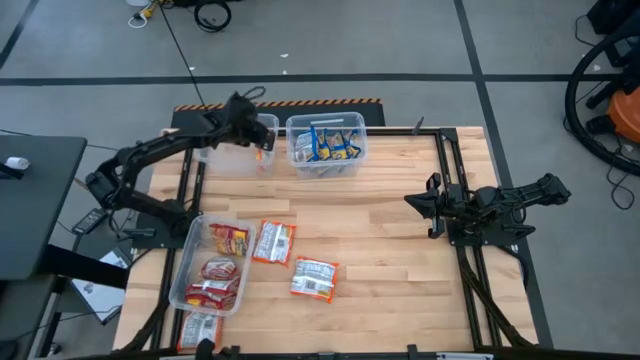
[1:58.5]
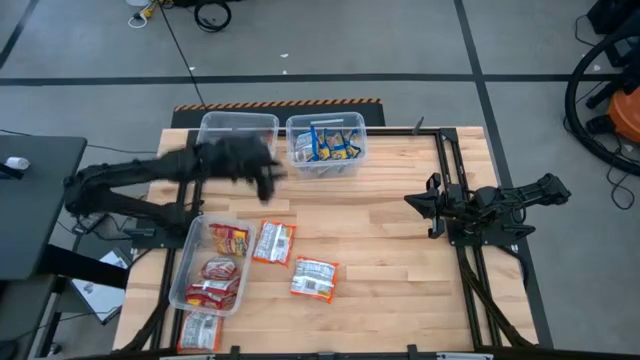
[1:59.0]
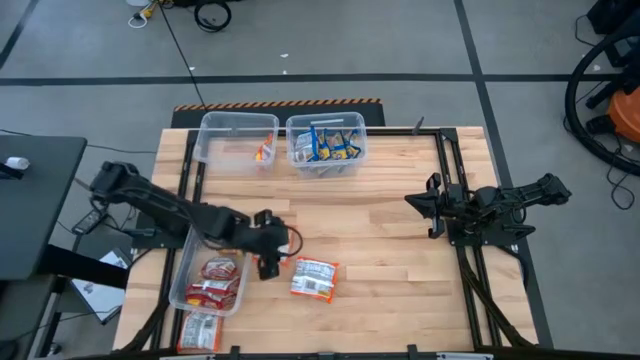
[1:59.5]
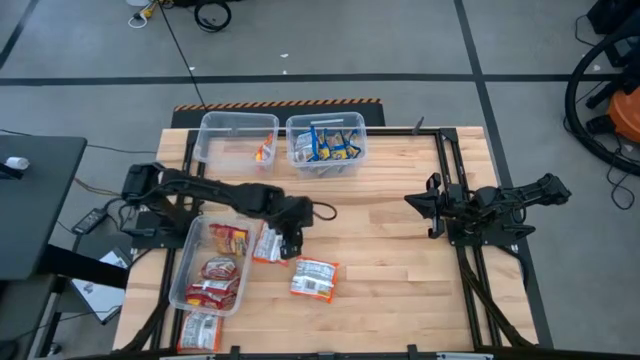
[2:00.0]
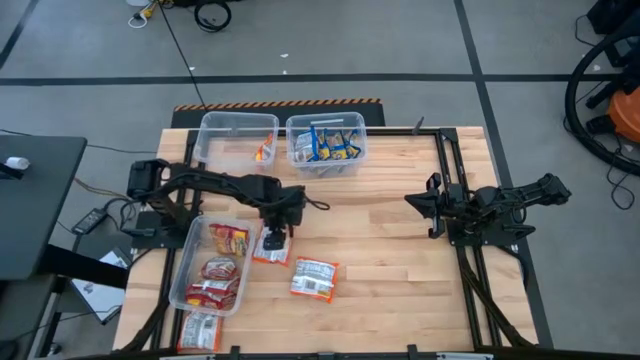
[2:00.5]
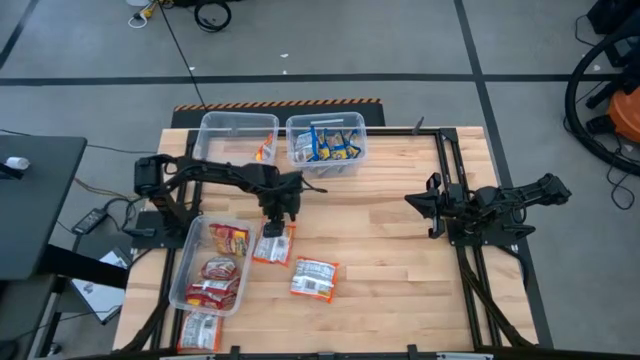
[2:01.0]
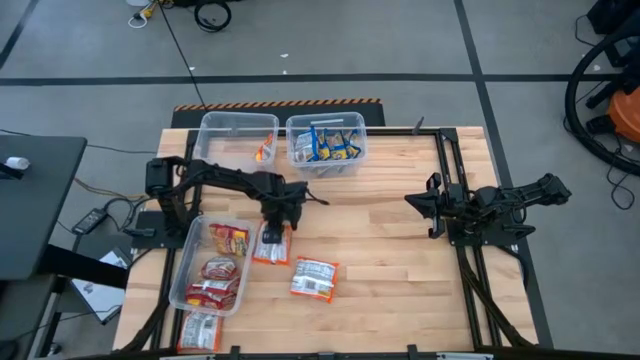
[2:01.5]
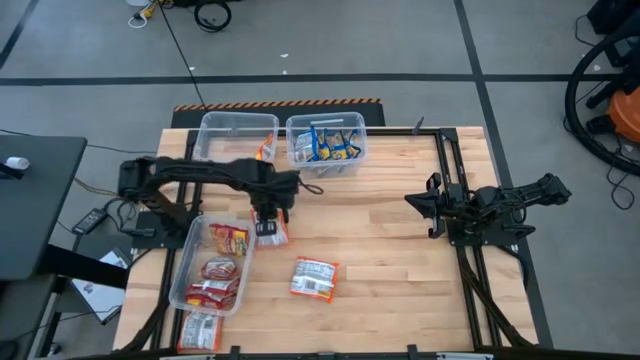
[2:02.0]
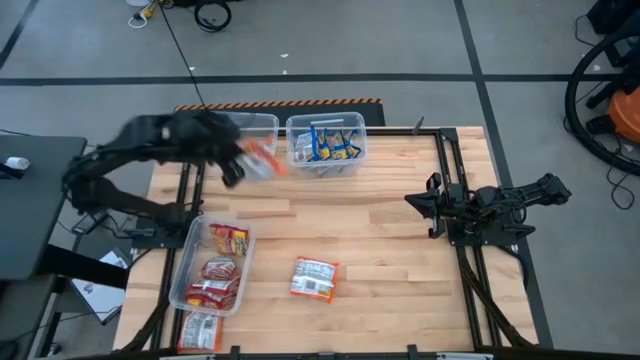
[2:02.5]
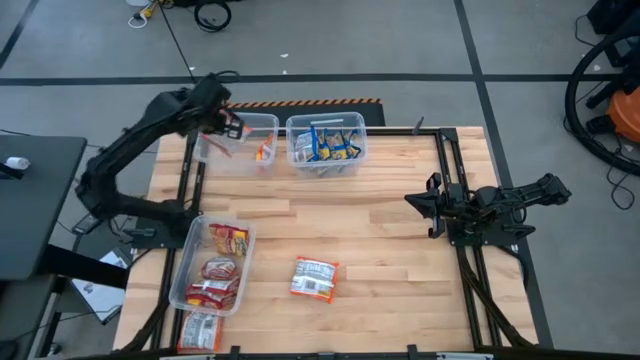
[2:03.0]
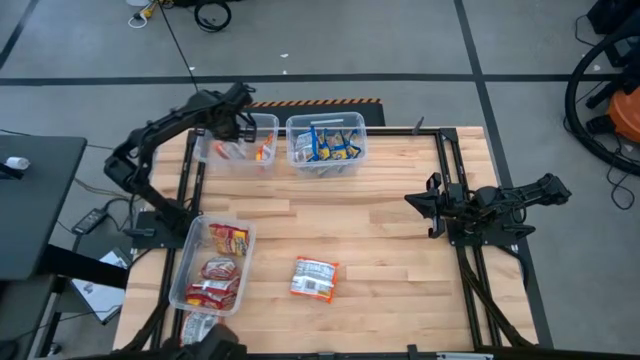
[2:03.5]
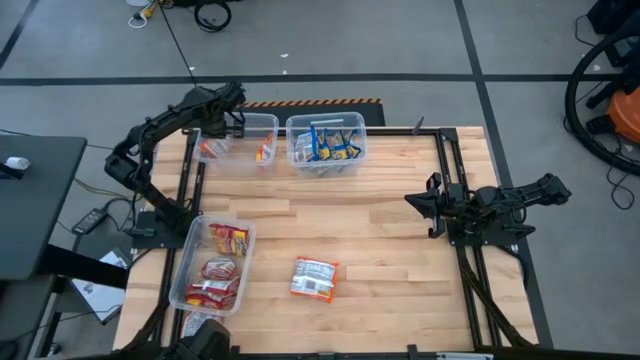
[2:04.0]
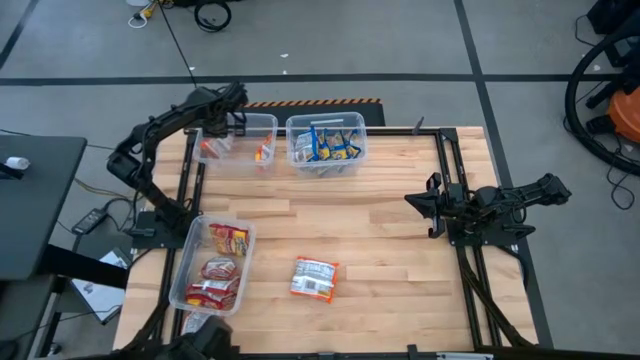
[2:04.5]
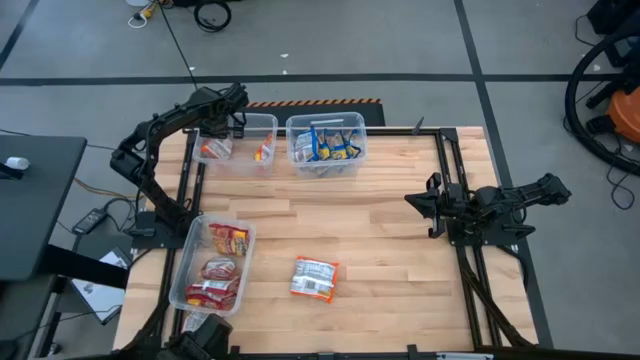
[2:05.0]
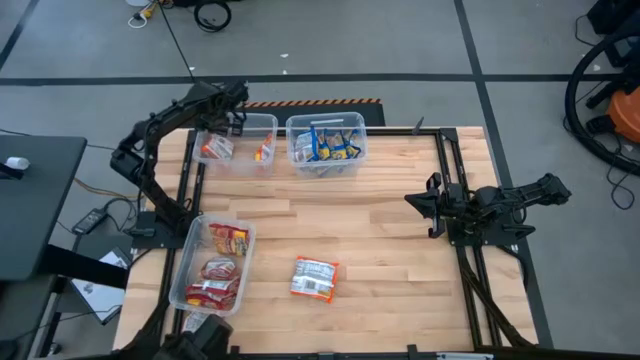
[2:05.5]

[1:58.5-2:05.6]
Task: Sort Maruchan noodles
Put the top orange noodle pack into the top left transparent bin

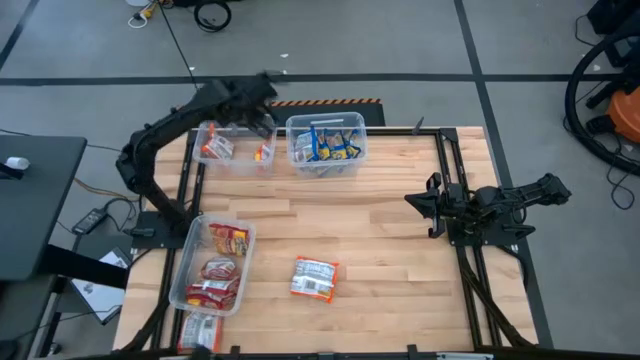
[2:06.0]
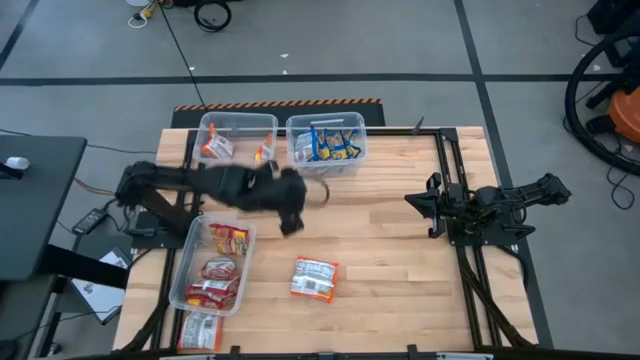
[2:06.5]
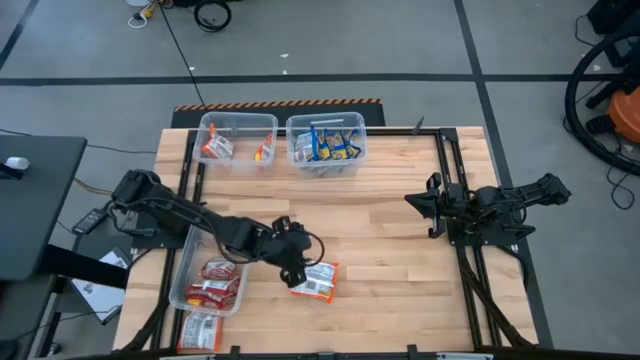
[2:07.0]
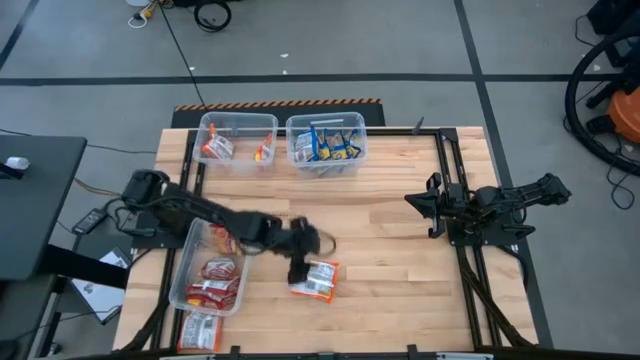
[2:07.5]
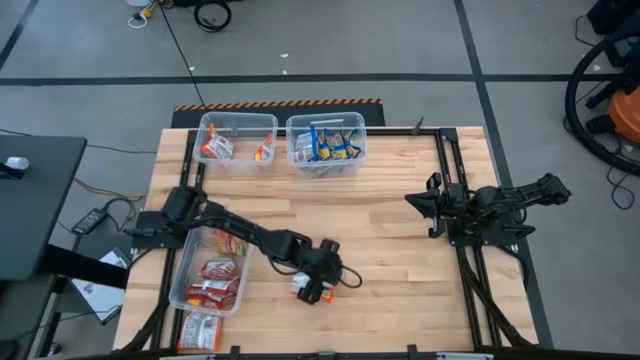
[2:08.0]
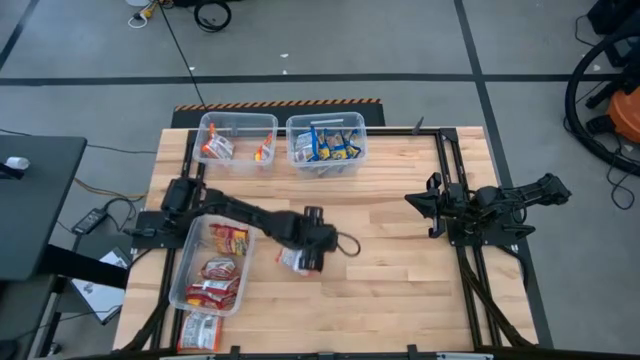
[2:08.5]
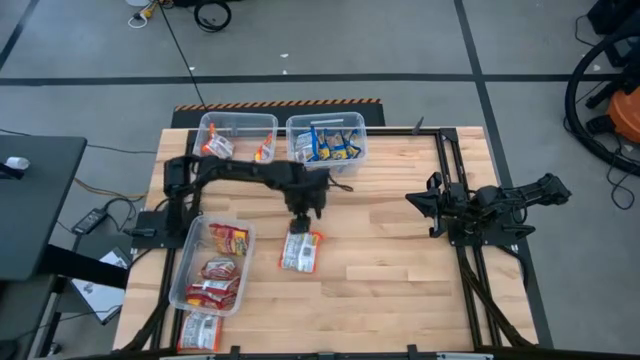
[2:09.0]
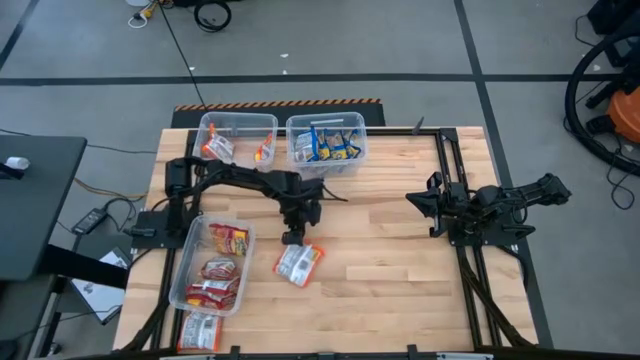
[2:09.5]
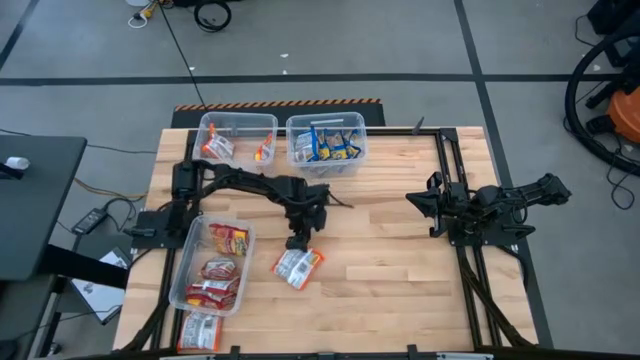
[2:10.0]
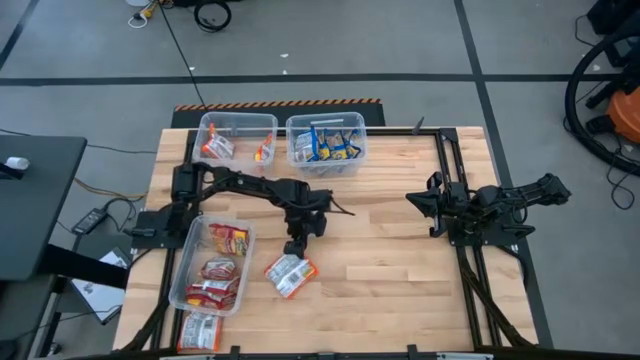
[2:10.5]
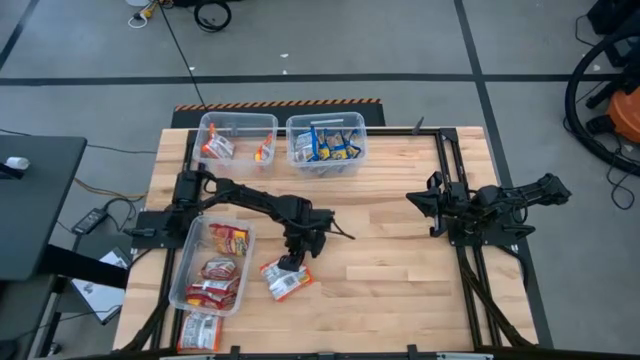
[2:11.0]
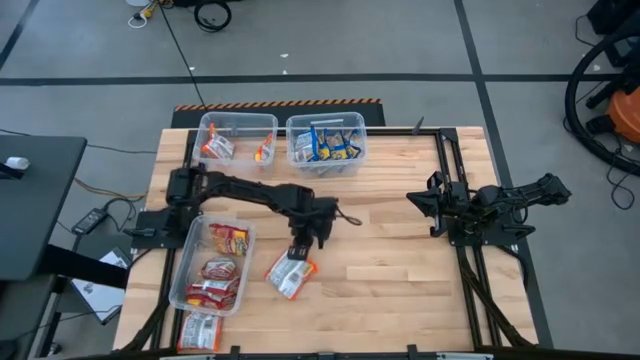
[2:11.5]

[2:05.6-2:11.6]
Put the top orange noodle pack into the top left transparent bin

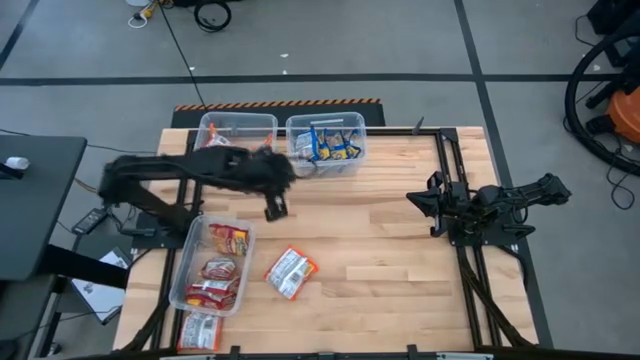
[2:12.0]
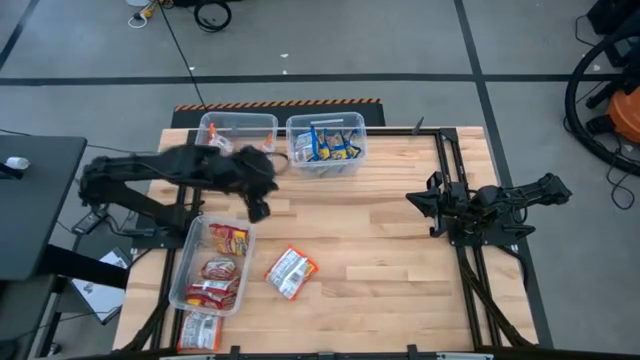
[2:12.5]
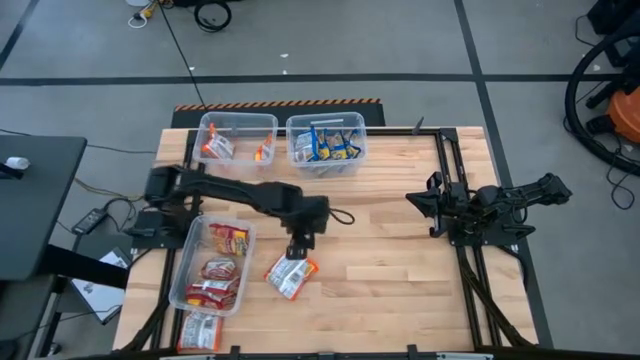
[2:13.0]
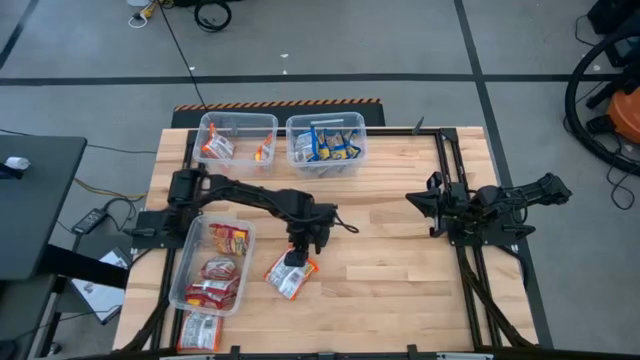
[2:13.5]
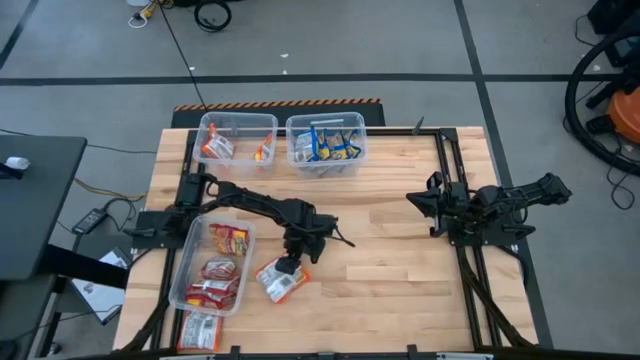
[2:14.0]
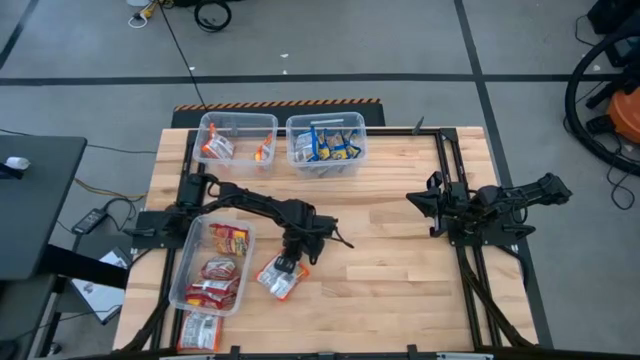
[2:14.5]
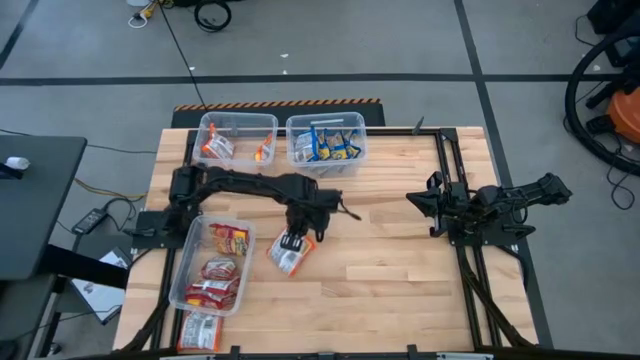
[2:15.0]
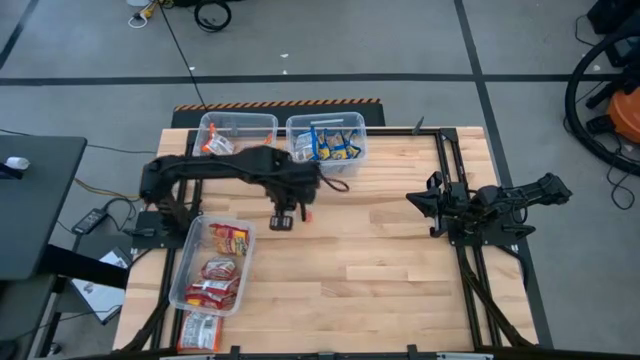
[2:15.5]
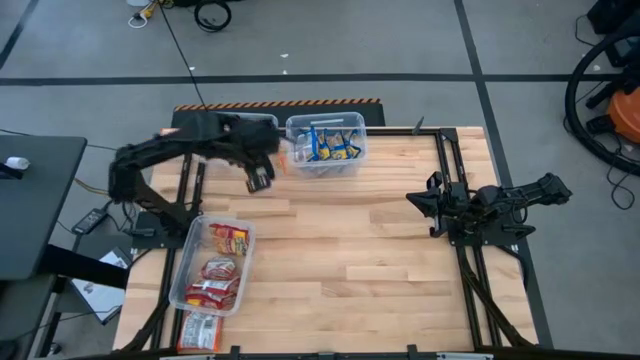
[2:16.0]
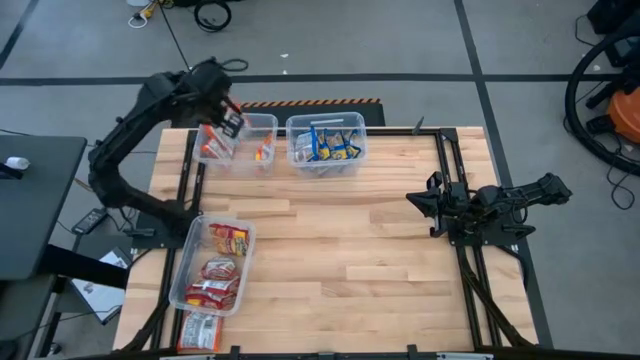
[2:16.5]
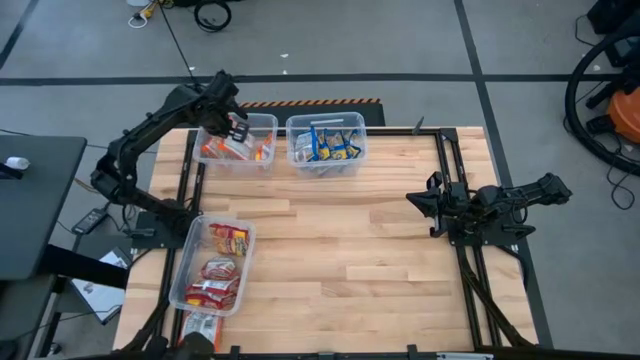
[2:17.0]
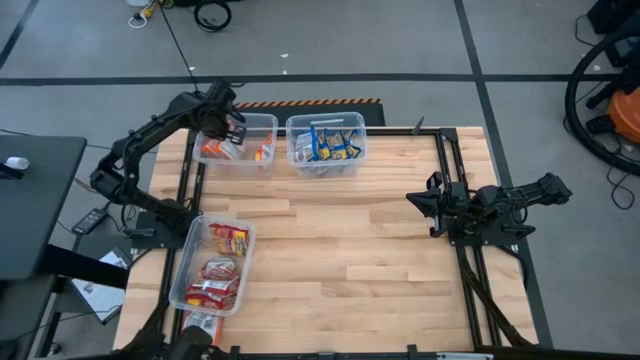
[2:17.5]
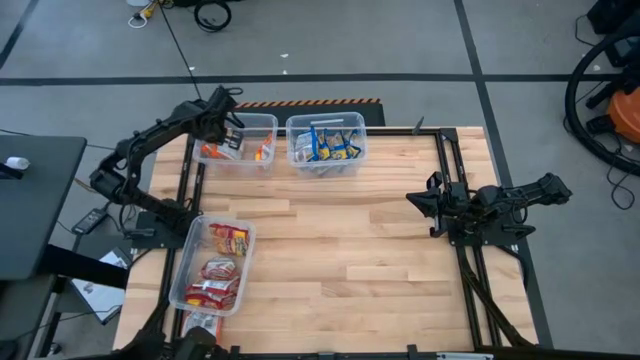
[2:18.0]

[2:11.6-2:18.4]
Put the top orange noodle pack into the top left transparent bin

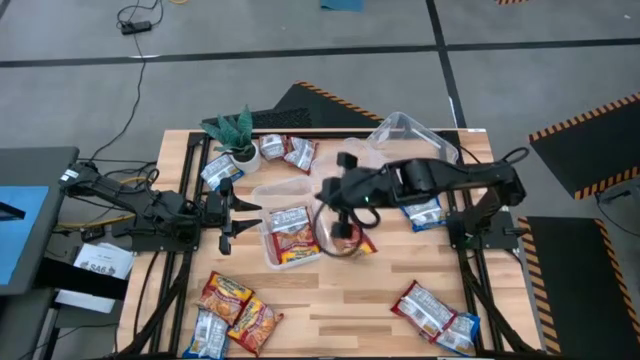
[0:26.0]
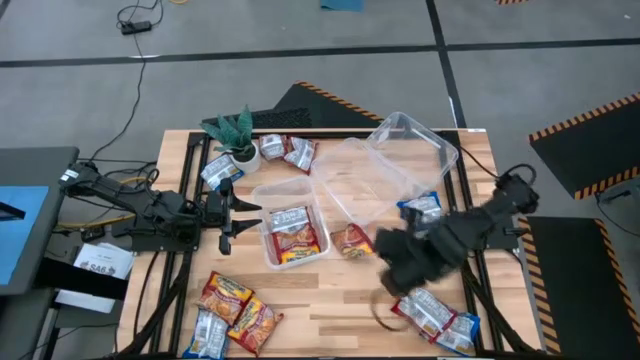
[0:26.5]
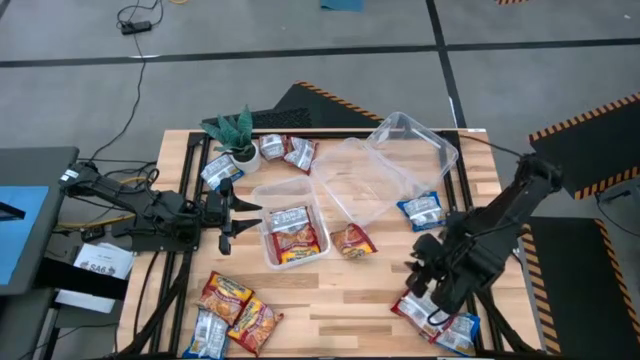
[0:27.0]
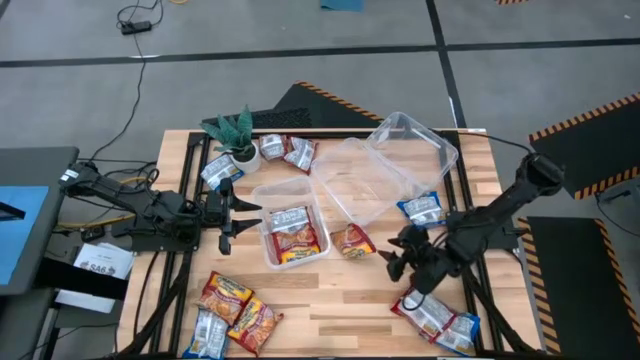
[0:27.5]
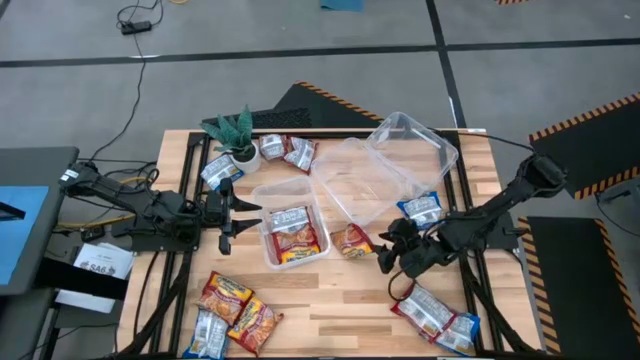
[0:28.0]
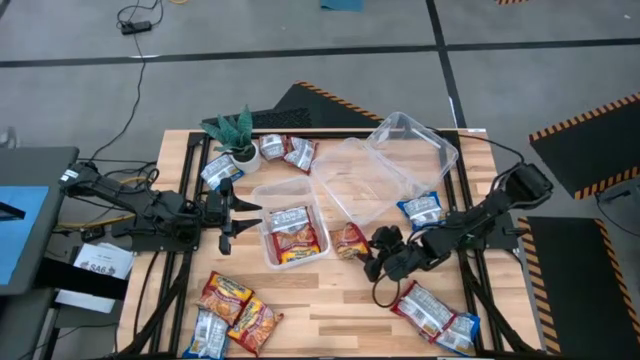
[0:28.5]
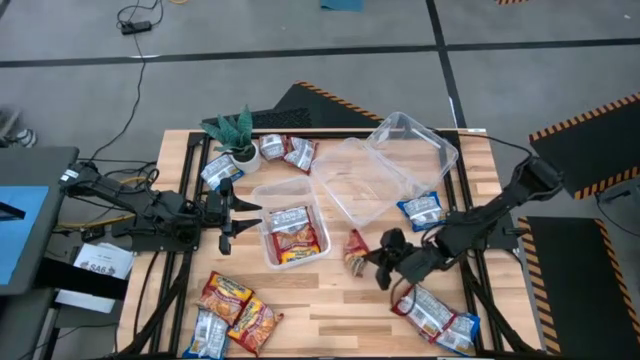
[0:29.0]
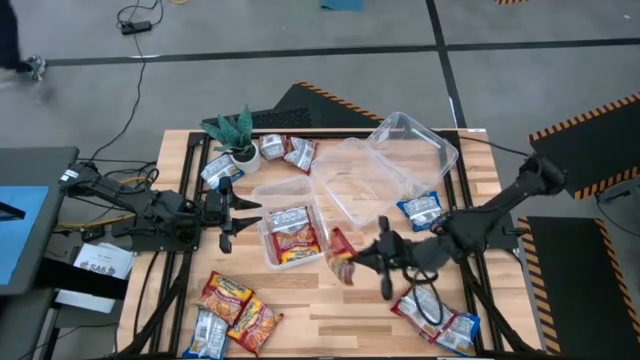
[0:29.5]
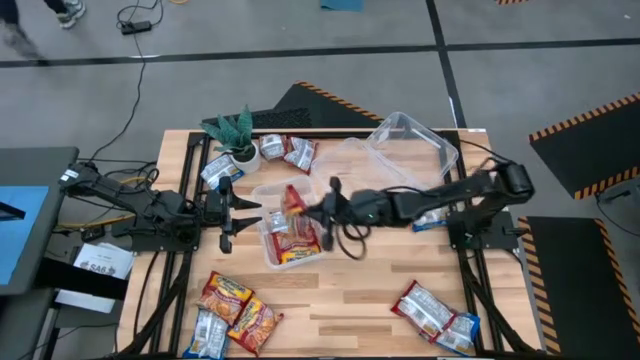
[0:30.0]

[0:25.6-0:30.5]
Task: Sort Maruchan noodles
Put the red noodle pack into the bottom bin
